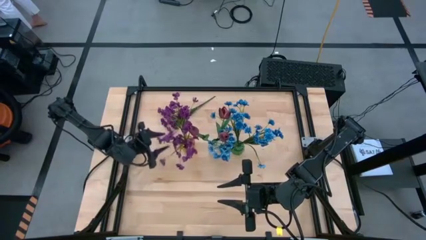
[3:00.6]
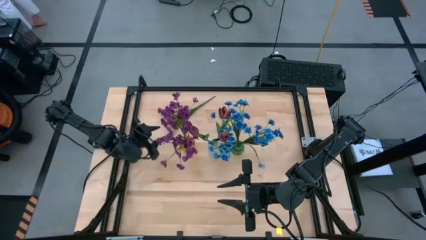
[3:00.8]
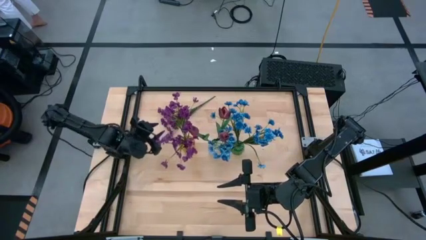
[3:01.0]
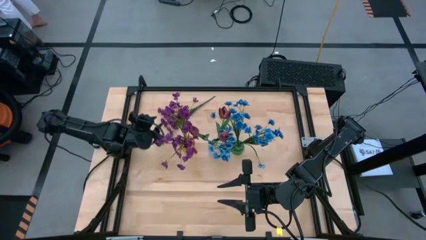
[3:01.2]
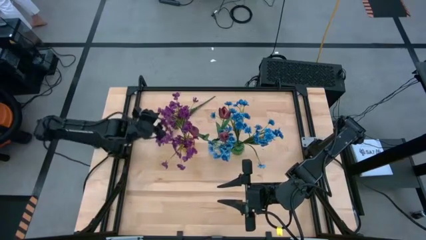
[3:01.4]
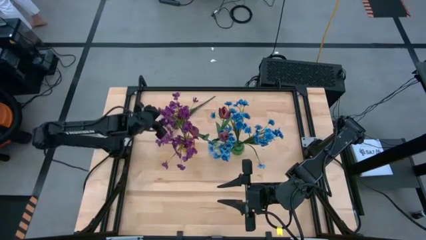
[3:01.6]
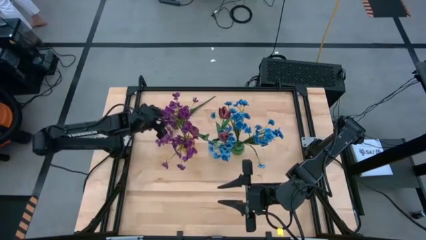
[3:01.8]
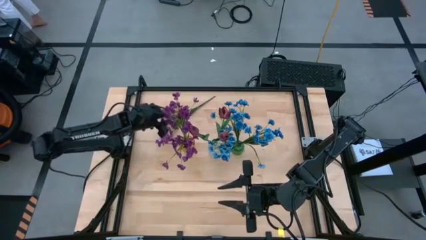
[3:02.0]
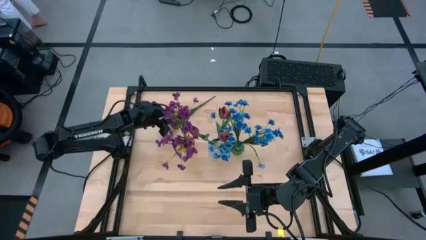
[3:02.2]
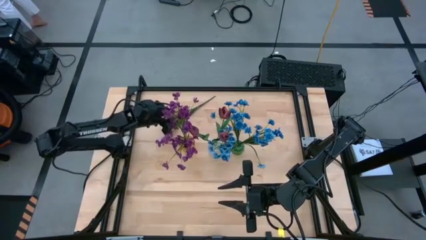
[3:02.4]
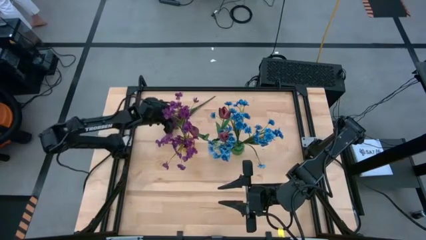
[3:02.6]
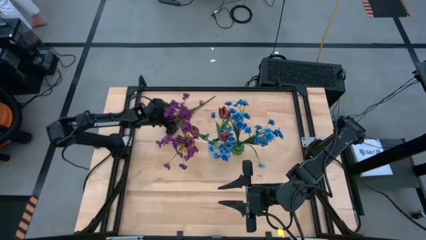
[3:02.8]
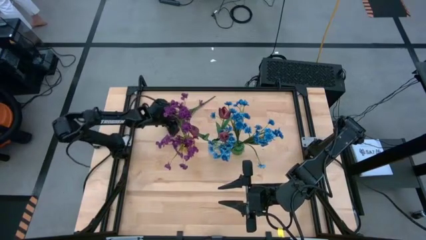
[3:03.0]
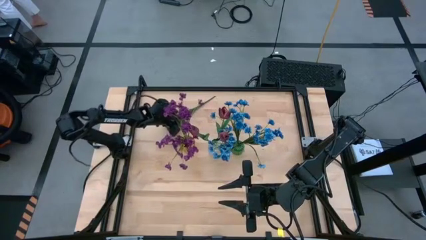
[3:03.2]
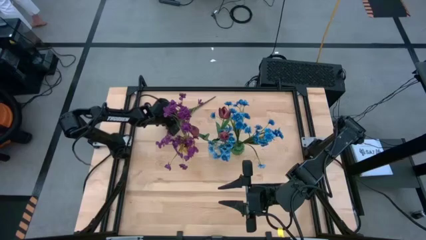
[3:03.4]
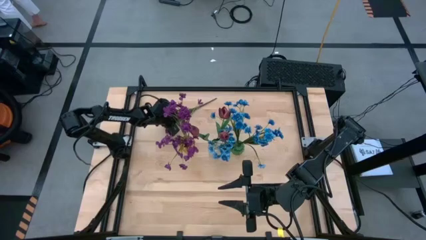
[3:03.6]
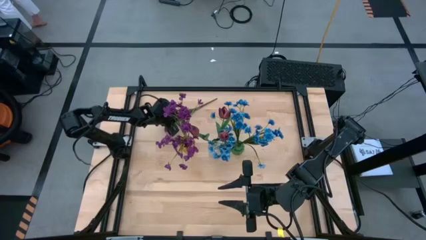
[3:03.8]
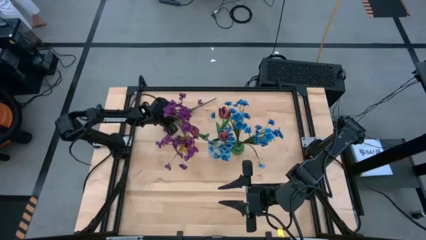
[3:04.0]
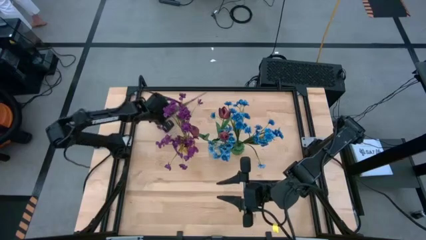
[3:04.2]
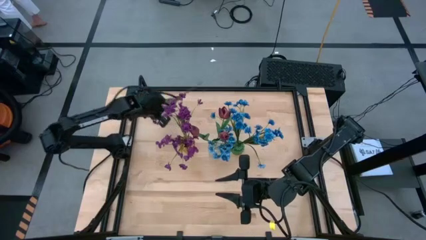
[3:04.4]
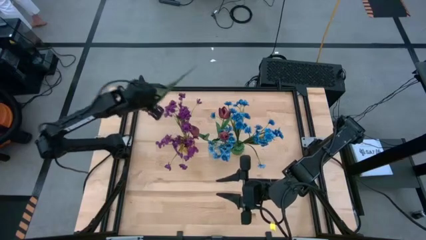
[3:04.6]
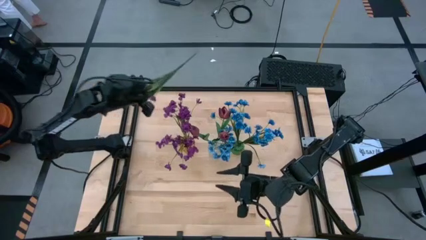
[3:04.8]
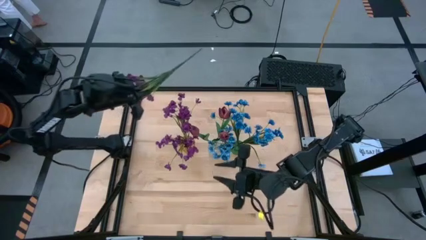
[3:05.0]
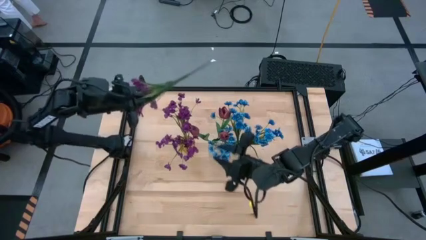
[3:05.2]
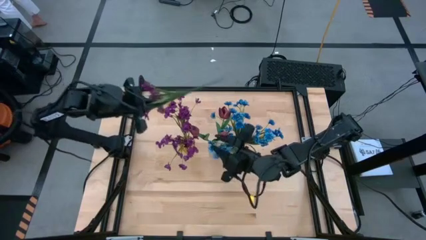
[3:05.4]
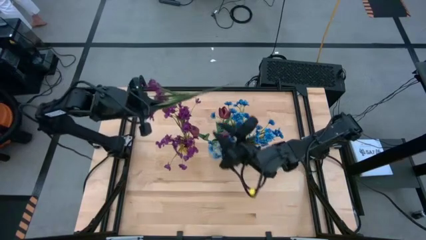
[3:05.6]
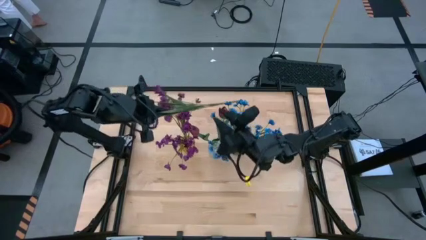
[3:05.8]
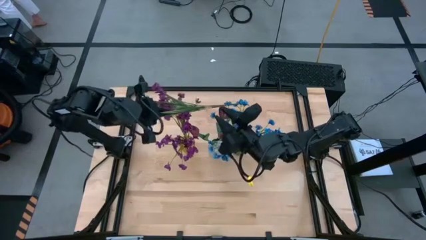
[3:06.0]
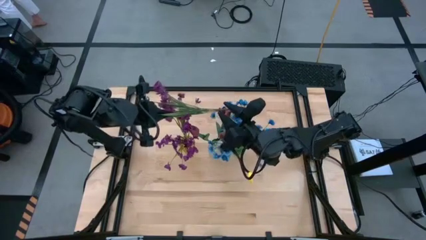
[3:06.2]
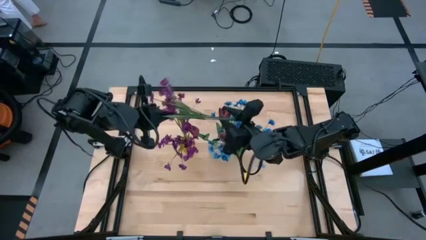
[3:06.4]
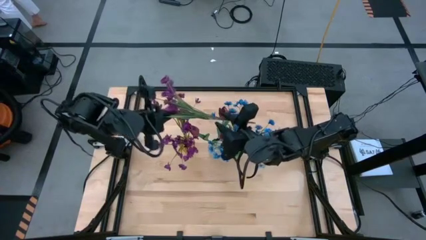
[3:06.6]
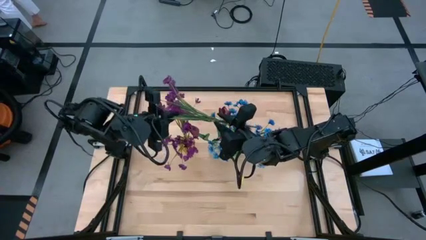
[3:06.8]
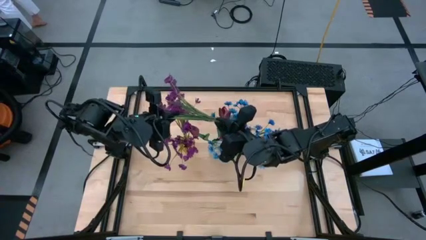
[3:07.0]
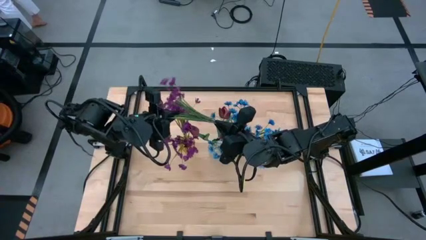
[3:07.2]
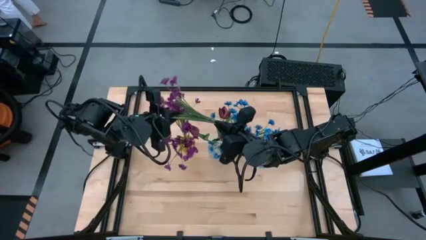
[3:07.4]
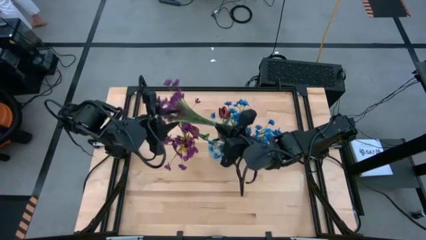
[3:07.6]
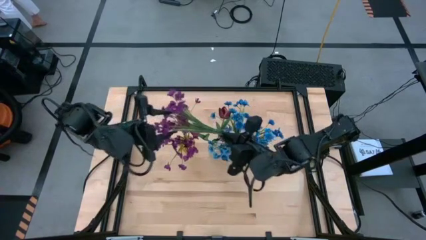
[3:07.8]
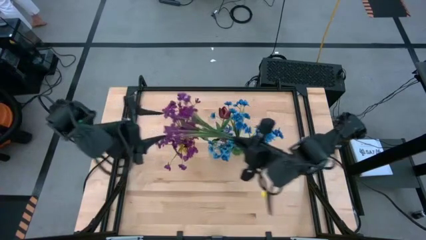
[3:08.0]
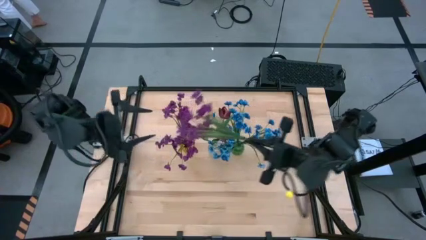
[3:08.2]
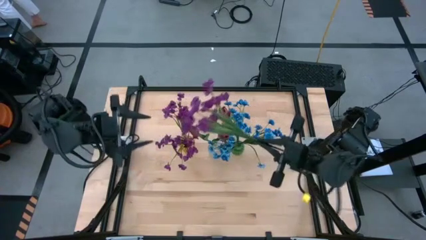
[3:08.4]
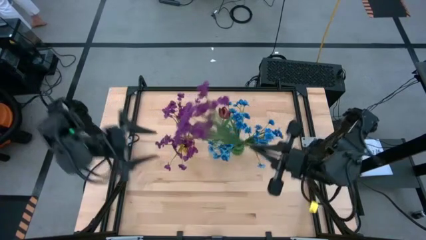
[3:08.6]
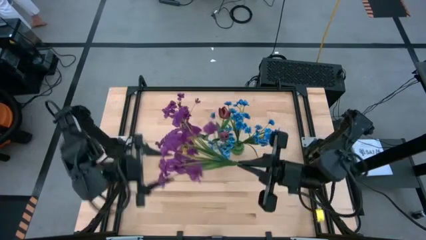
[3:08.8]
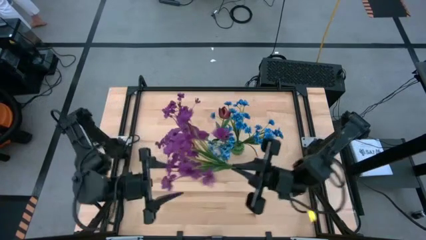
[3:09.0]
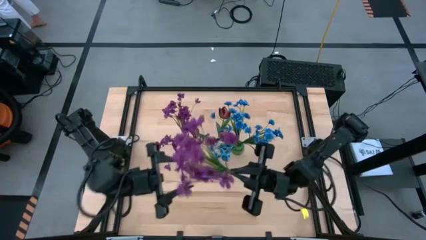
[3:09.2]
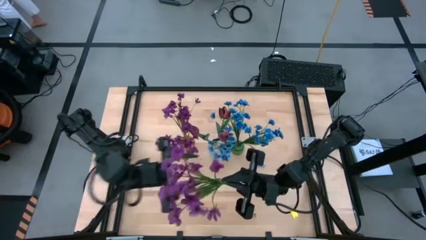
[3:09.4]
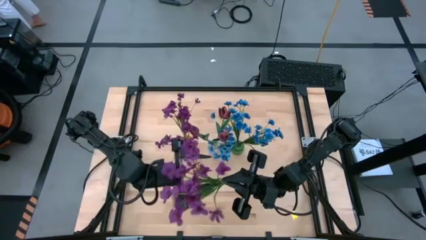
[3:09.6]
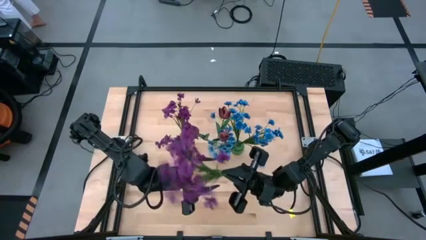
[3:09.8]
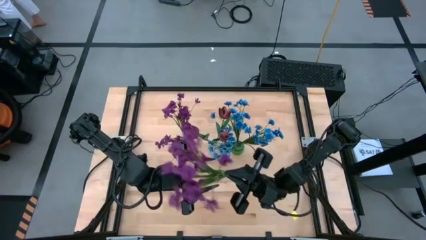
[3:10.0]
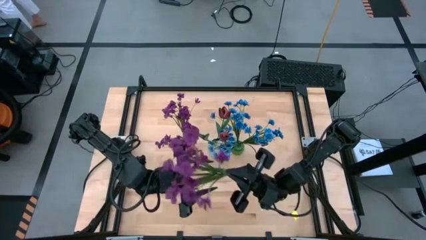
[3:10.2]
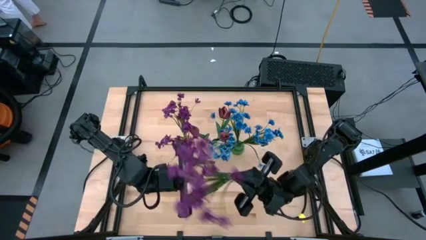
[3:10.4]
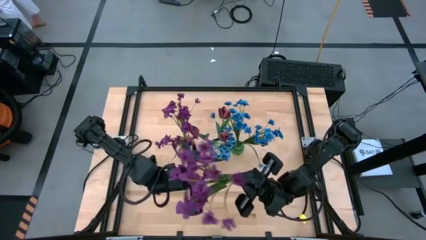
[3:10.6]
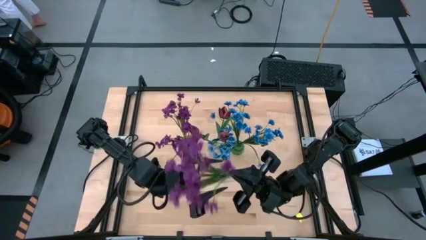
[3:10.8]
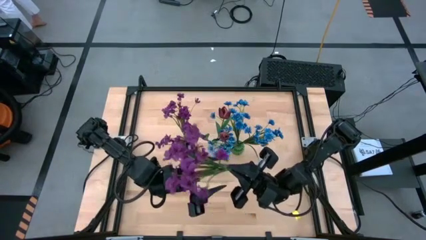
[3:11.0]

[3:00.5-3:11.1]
Task: Sort flowers into vase by color
Put the purple flowers into the yellow vase

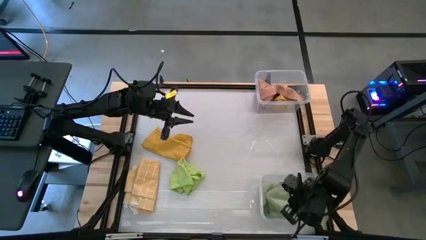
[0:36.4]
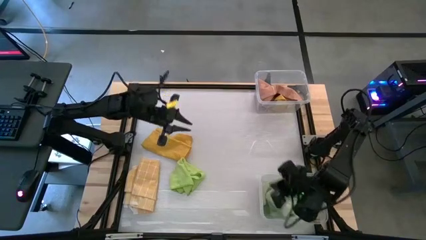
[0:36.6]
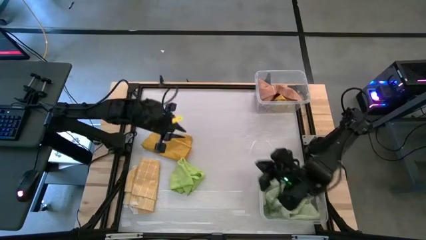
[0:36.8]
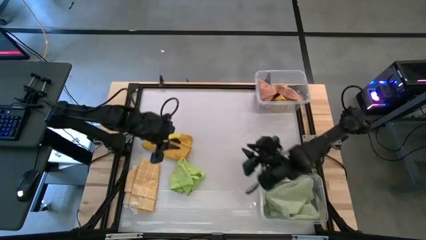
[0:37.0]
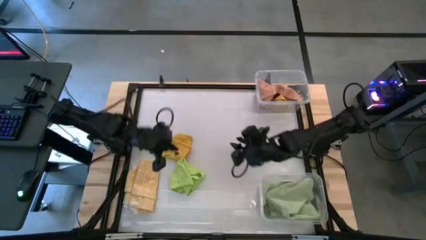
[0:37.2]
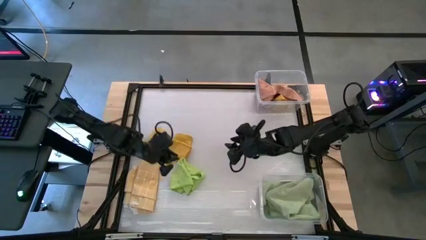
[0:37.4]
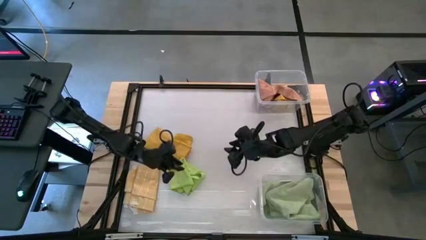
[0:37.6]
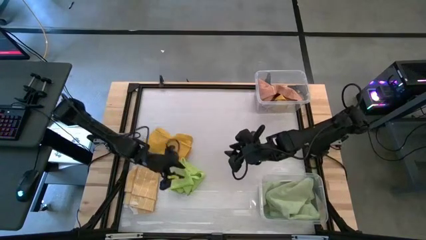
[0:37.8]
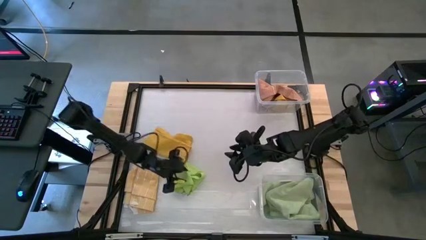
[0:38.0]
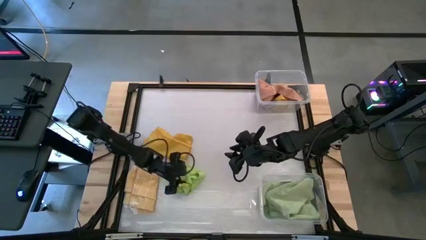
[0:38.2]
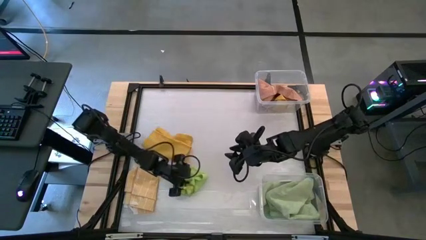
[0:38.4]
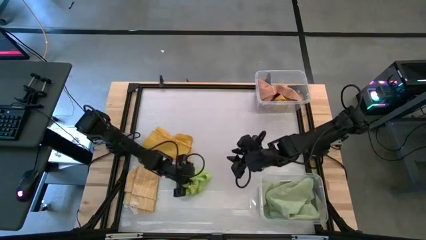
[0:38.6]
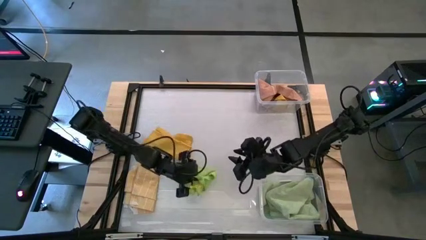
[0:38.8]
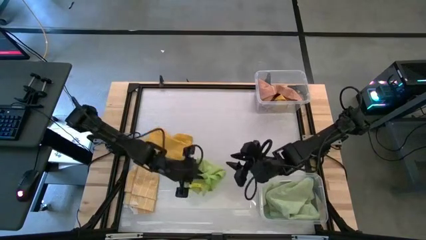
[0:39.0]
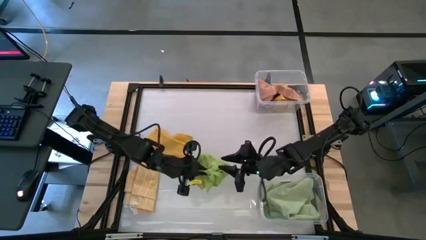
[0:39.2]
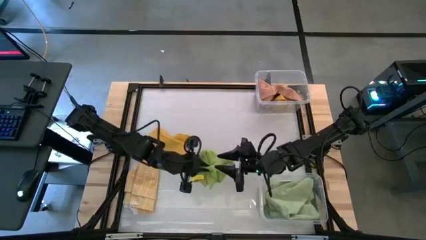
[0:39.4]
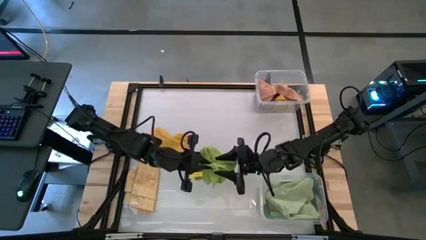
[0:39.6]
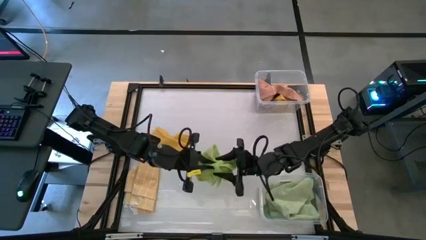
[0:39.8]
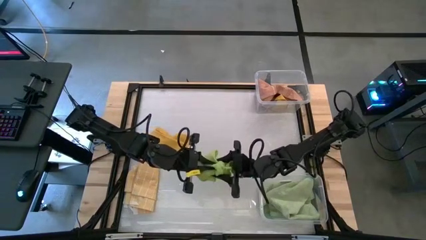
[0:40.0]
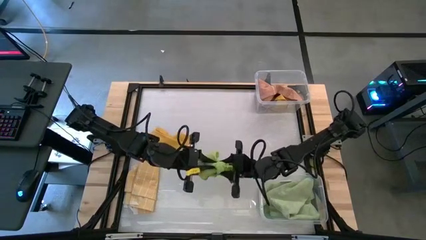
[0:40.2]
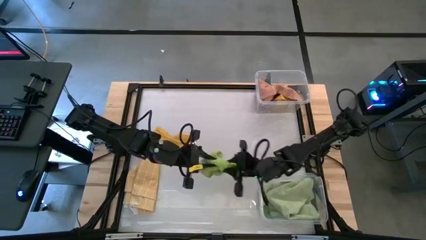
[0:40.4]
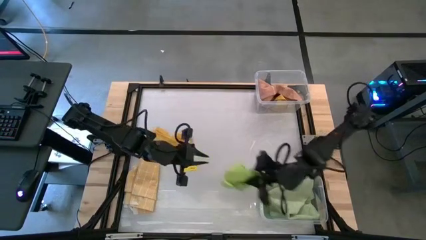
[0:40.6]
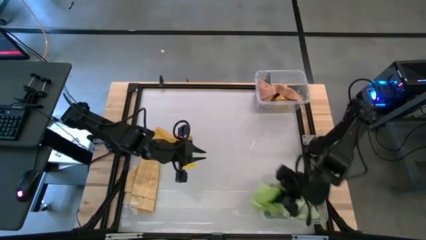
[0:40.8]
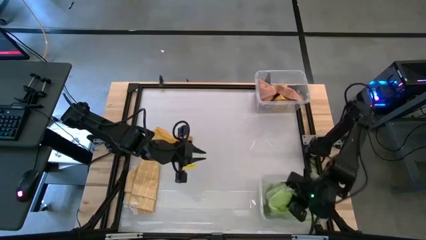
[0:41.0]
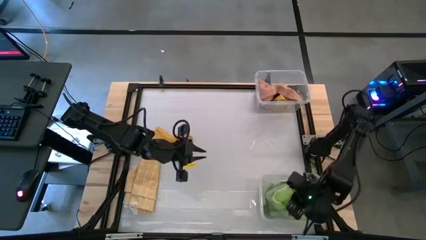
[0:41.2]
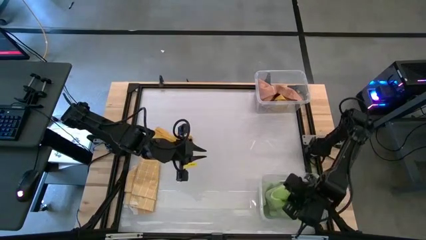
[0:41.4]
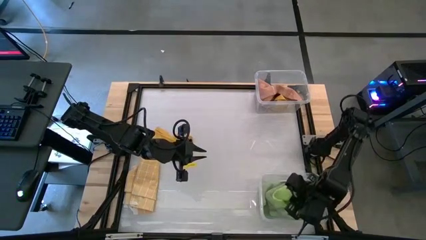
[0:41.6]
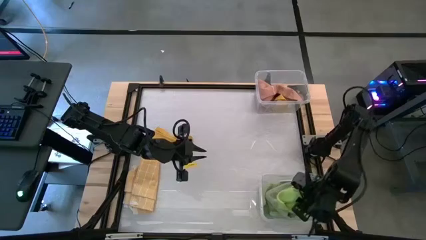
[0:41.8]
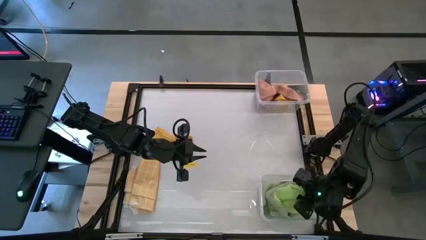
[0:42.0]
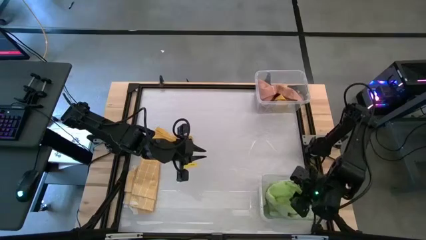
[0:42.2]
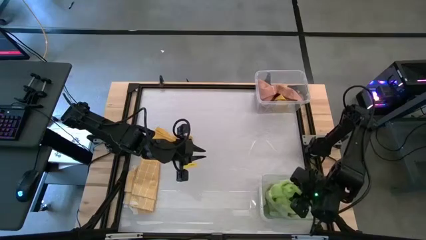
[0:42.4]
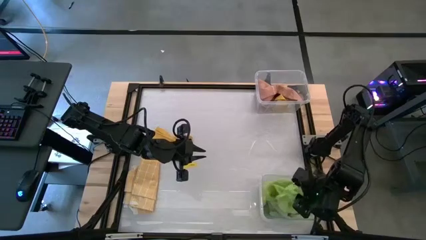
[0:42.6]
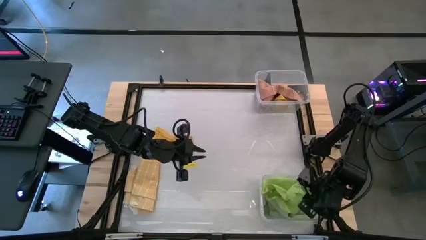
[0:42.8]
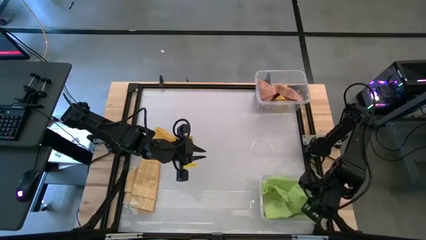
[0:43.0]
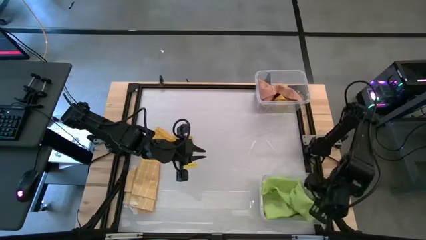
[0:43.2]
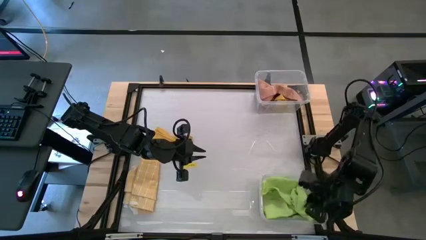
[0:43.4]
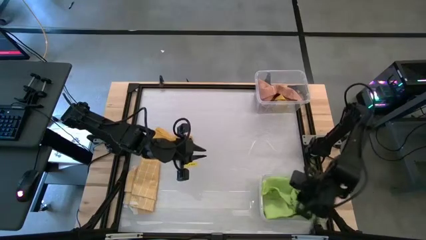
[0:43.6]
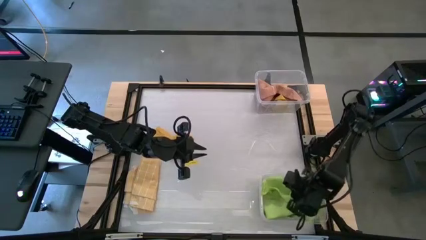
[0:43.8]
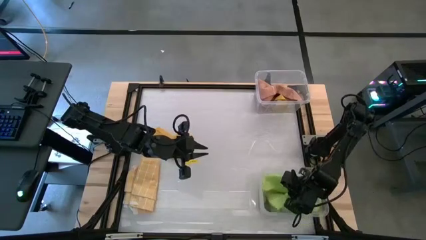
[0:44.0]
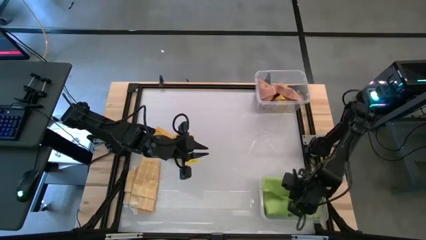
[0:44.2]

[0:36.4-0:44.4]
Task: Sort microfiber towel by color & place in baskets
Put the green microfiber towel into the bottom transparent bin
